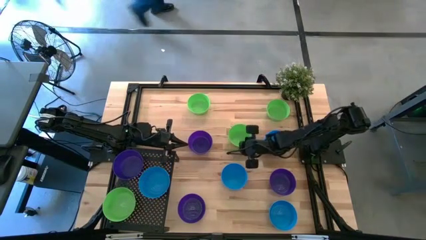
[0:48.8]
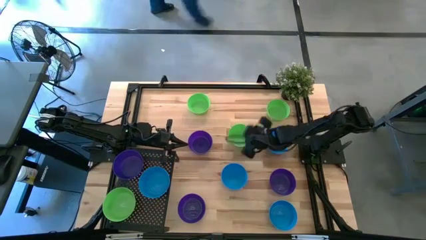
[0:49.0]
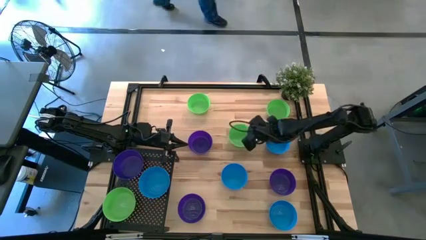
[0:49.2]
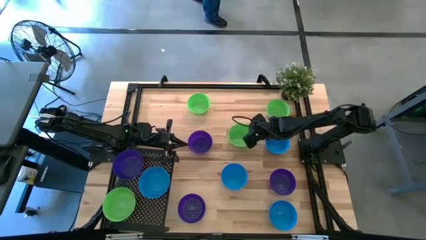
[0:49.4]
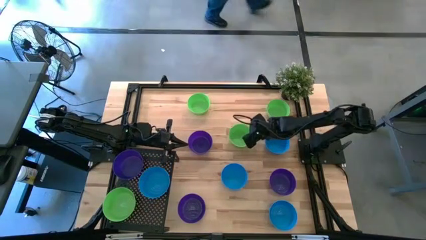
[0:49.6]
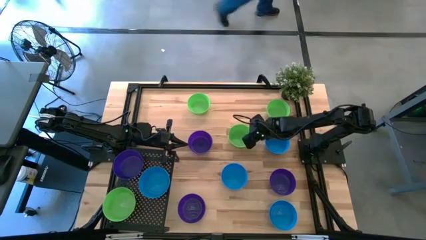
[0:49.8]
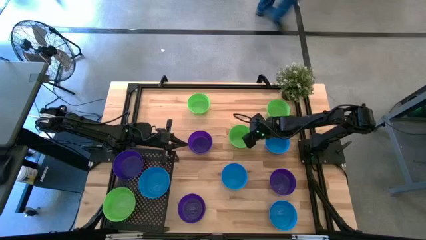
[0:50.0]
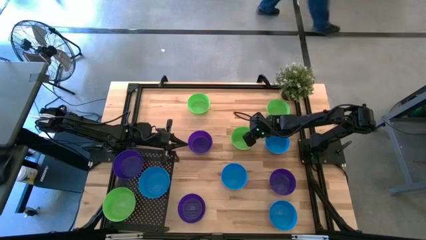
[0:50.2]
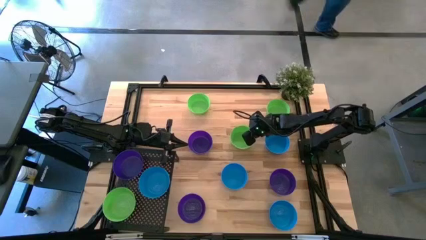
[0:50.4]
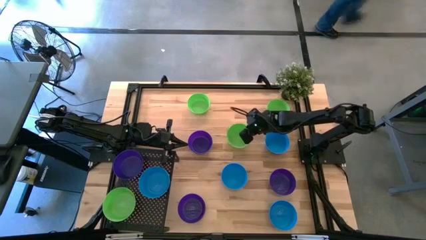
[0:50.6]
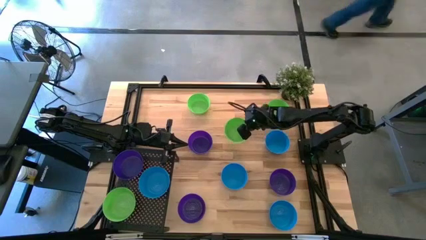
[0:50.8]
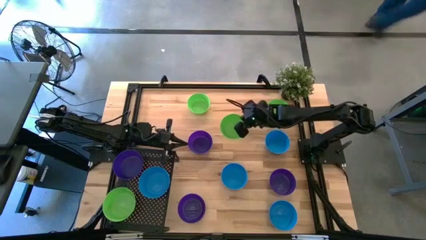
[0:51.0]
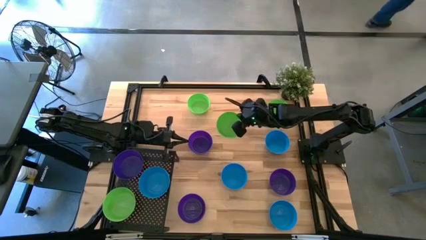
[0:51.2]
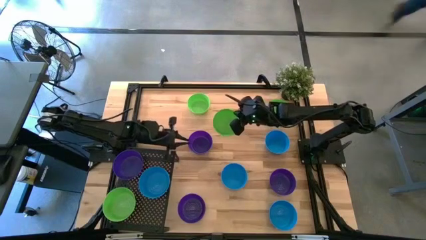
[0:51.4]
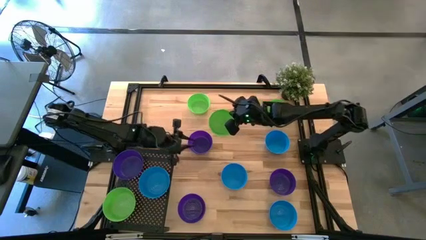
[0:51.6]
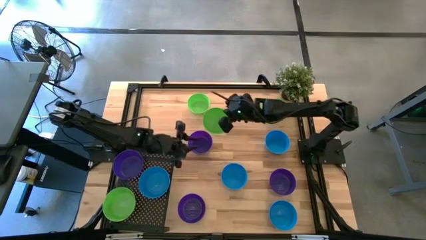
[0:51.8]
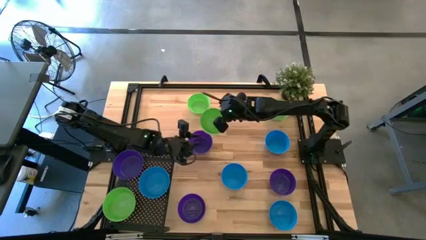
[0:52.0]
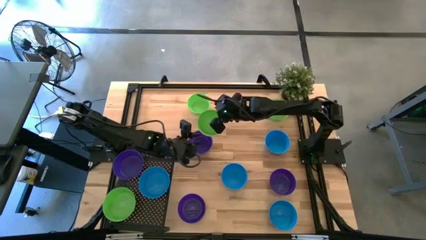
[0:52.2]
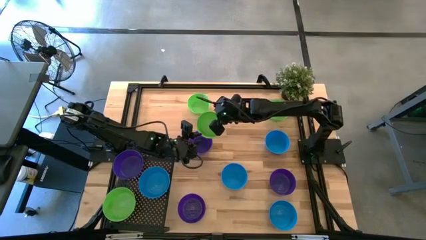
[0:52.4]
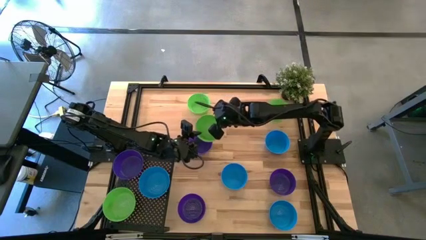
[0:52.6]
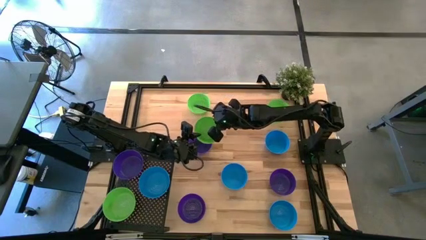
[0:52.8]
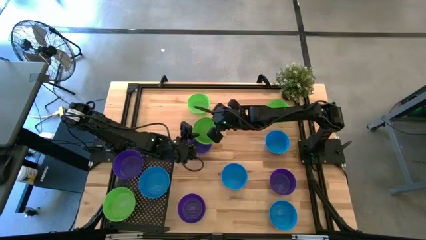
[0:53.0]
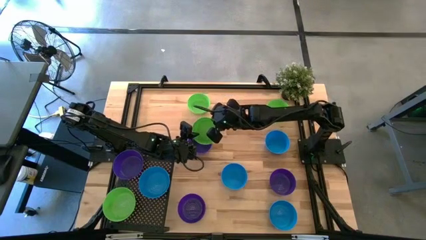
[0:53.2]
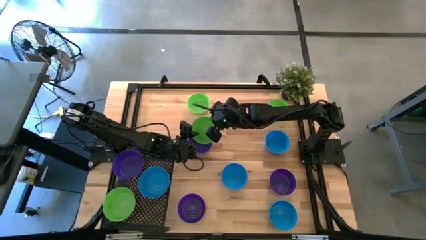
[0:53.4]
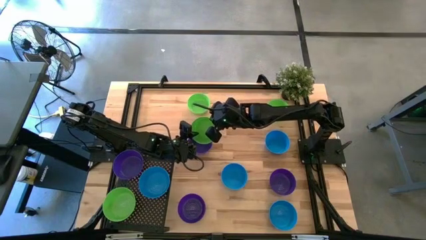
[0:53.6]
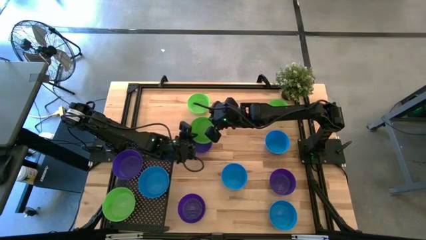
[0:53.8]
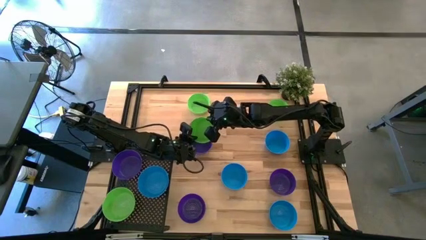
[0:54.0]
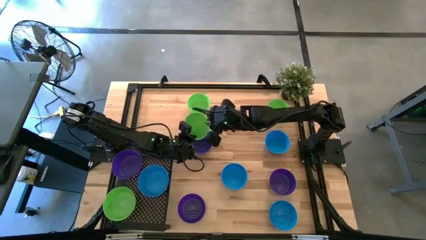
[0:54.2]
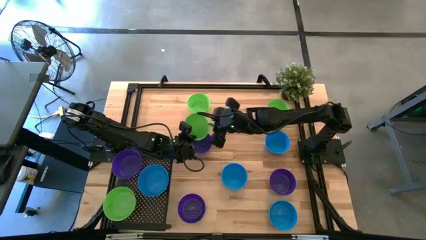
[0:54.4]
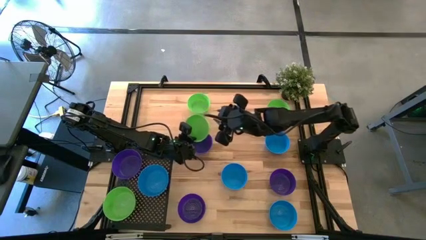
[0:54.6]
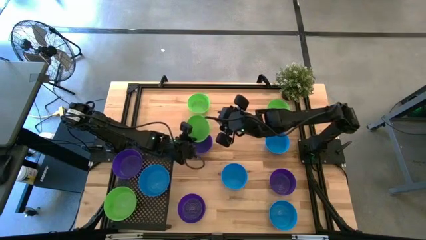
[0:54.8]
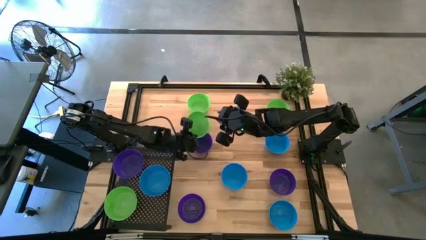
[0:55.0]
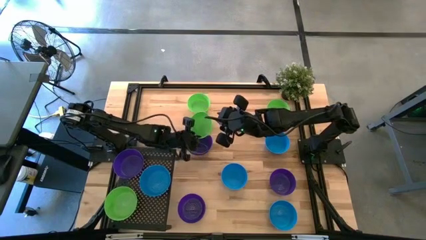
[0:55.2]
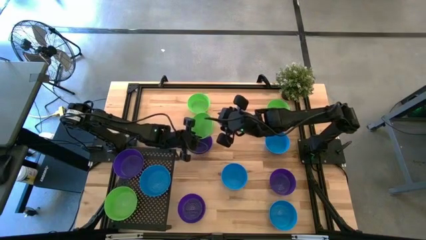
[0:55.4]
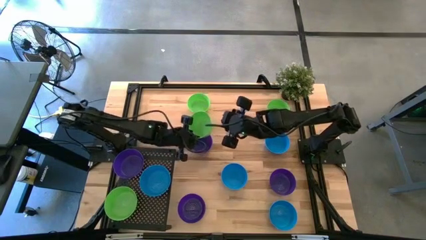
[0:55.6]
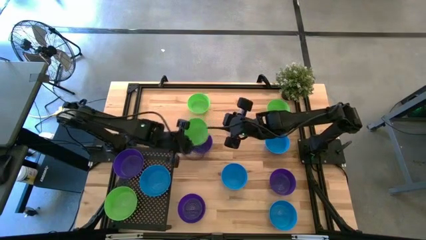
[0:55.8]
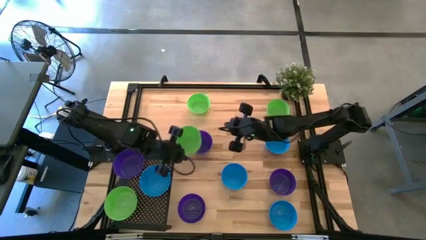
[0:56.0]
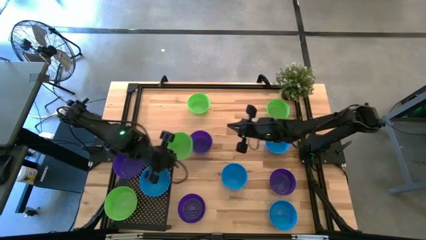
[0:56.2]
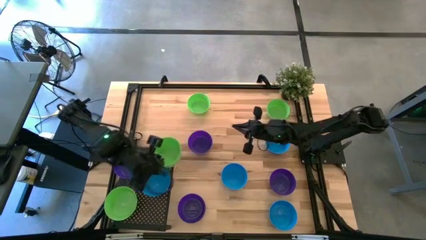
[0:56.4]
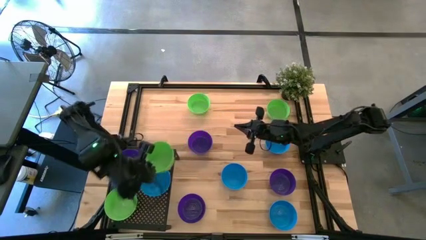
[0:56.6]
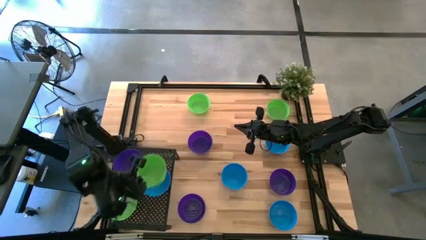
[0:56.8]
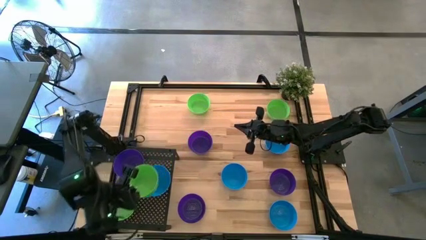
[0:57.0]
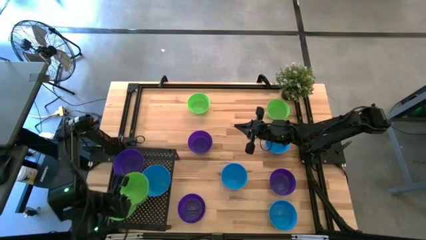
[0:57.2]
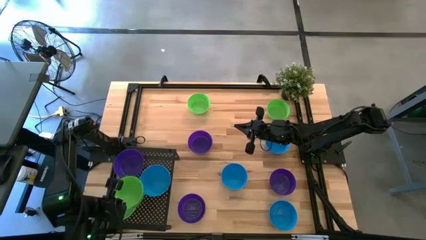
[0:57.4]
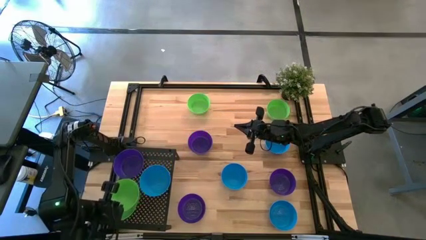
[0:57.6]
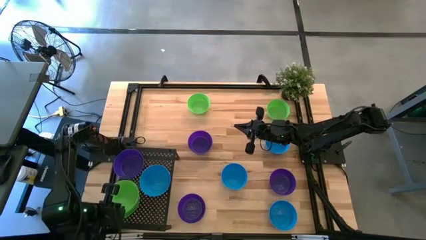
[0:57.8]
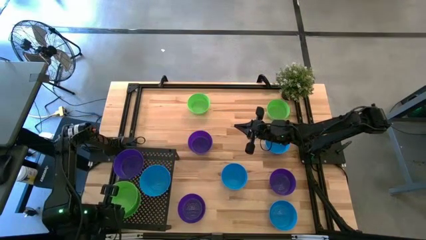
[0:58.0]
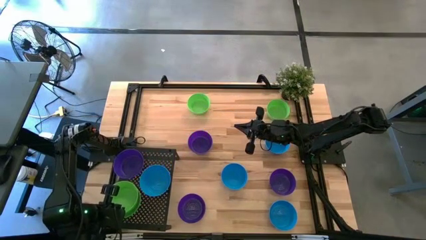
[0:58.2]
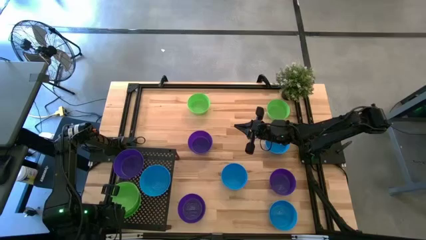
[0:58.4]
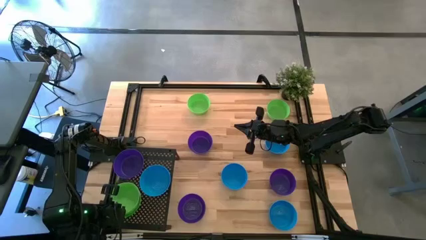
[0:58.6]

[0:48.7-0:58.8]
Task: Pick & Place Mini bowls
Stack the green bowl on the other green bowl on the shelf

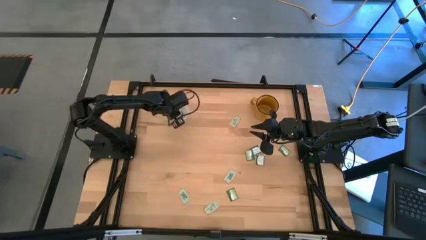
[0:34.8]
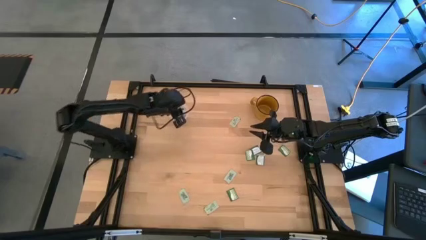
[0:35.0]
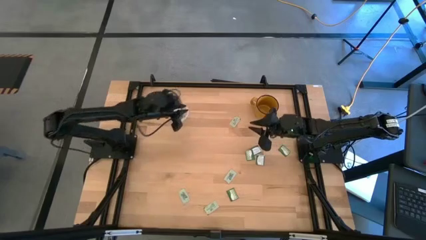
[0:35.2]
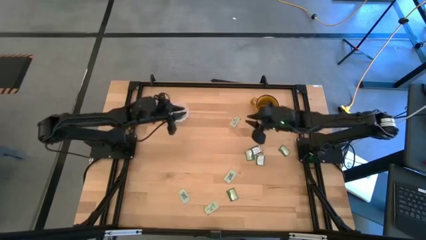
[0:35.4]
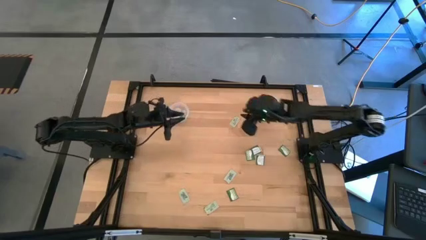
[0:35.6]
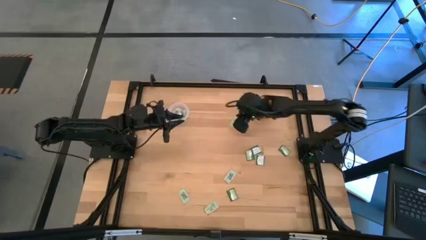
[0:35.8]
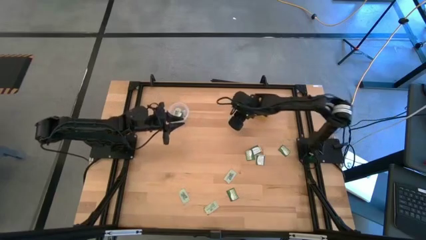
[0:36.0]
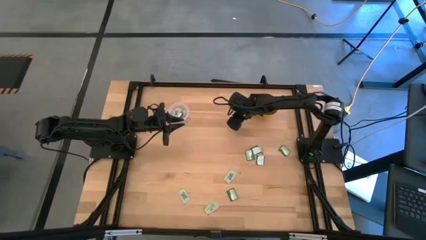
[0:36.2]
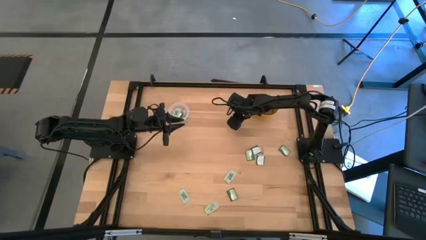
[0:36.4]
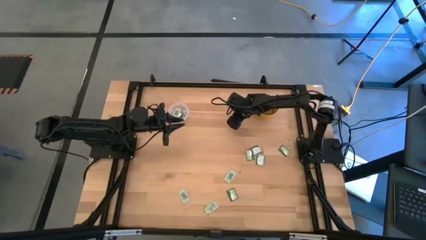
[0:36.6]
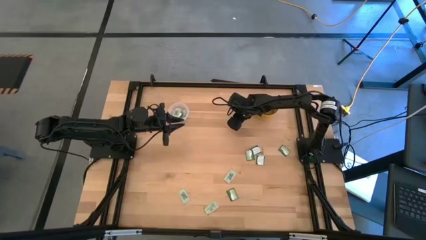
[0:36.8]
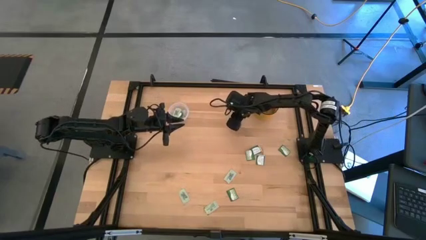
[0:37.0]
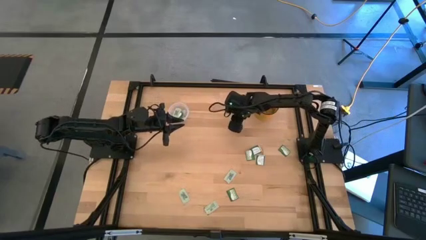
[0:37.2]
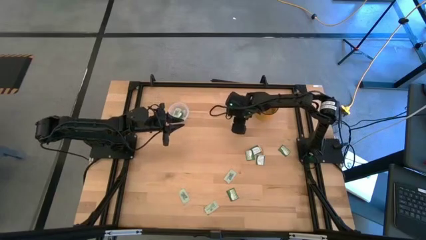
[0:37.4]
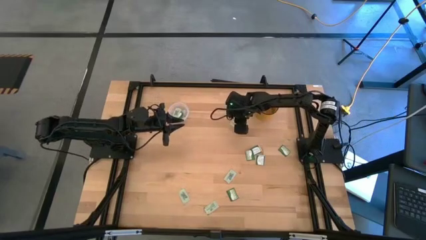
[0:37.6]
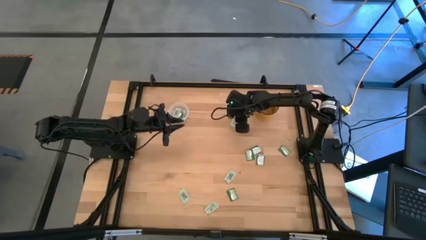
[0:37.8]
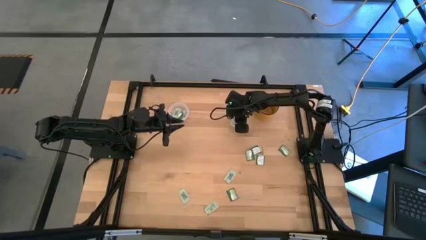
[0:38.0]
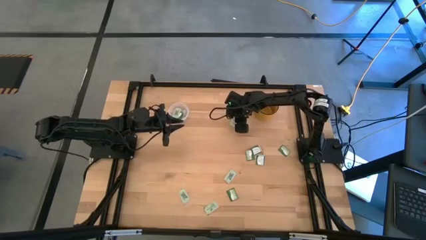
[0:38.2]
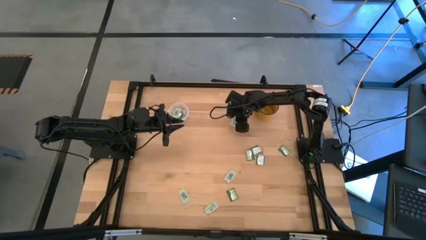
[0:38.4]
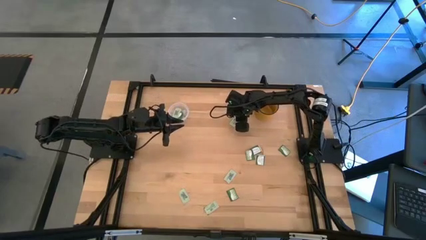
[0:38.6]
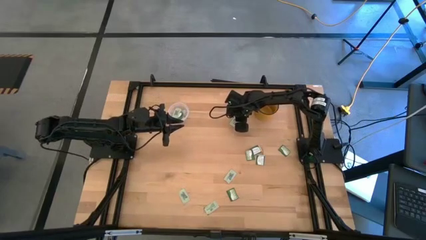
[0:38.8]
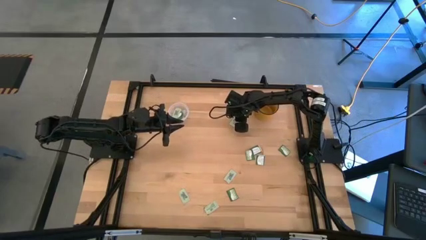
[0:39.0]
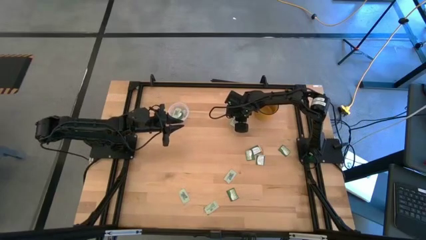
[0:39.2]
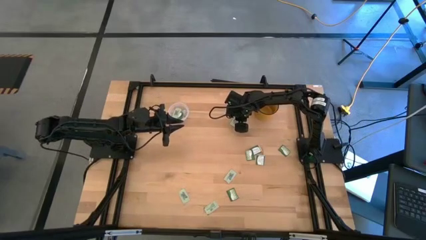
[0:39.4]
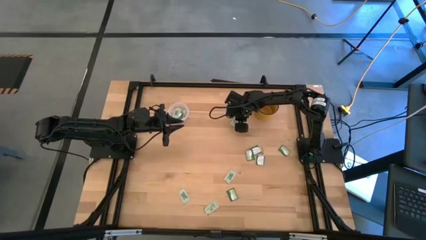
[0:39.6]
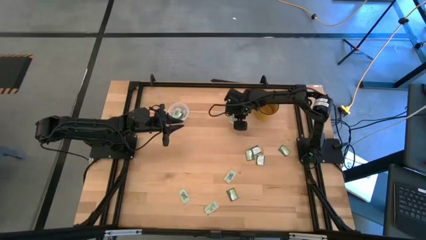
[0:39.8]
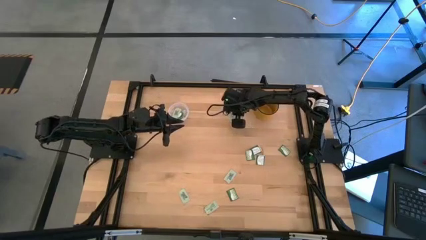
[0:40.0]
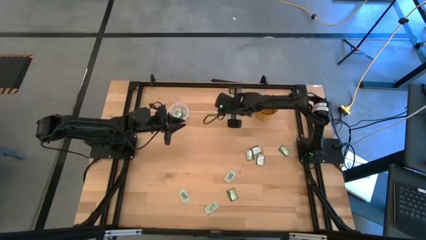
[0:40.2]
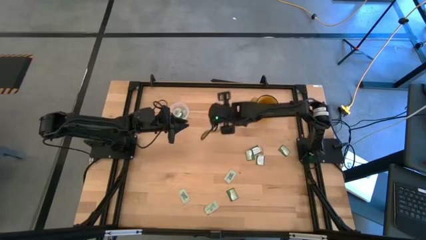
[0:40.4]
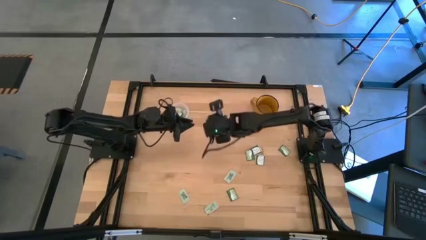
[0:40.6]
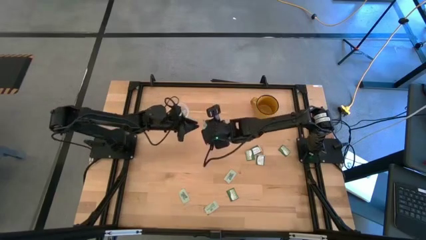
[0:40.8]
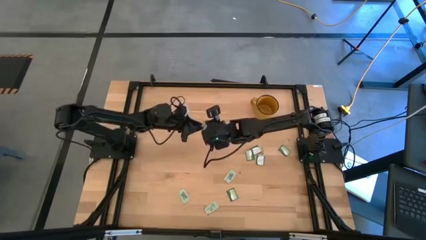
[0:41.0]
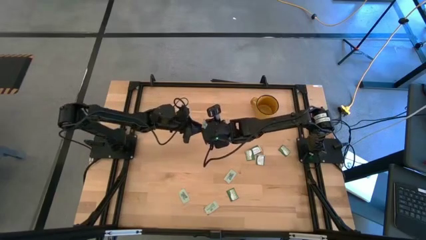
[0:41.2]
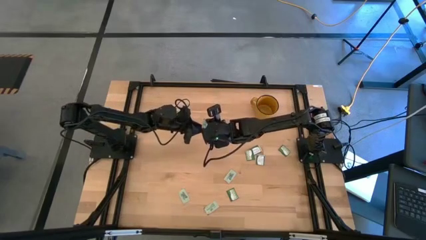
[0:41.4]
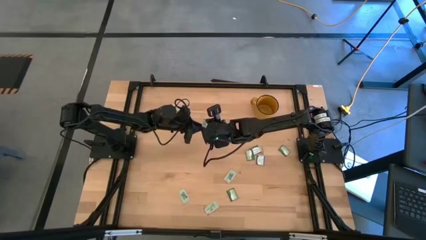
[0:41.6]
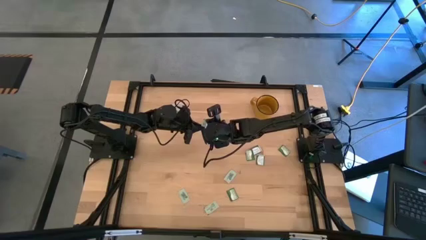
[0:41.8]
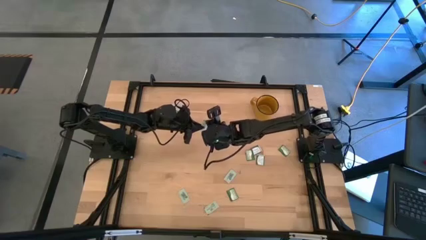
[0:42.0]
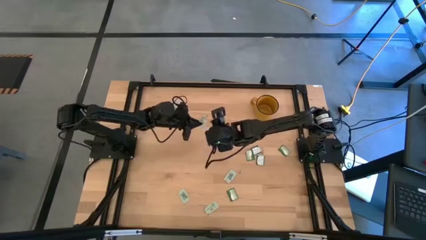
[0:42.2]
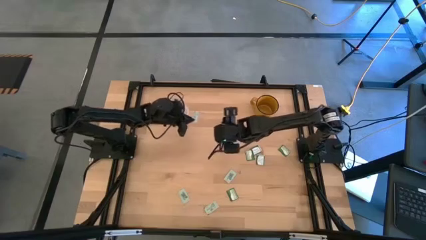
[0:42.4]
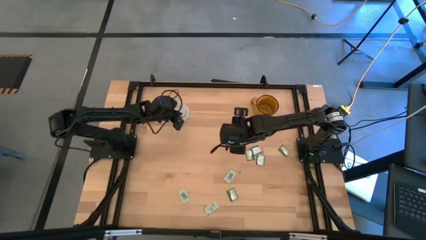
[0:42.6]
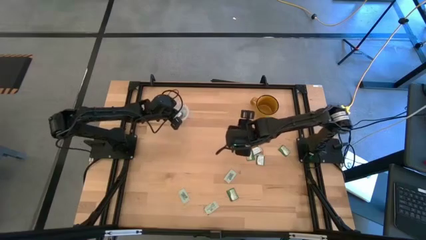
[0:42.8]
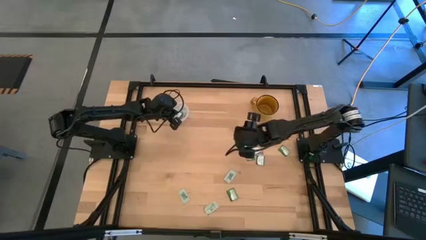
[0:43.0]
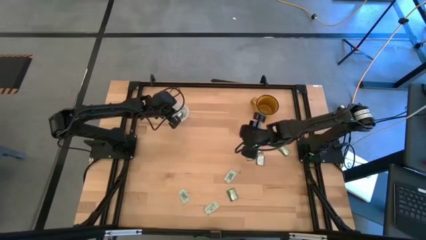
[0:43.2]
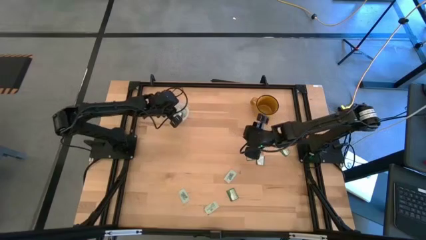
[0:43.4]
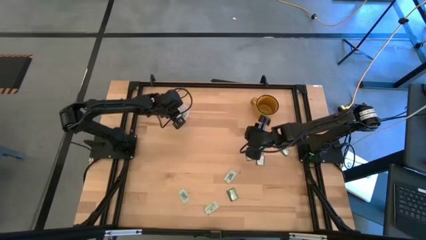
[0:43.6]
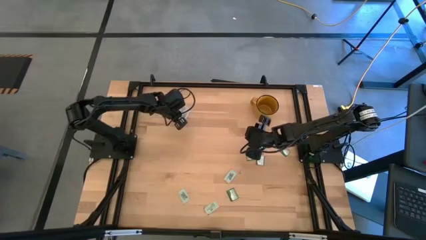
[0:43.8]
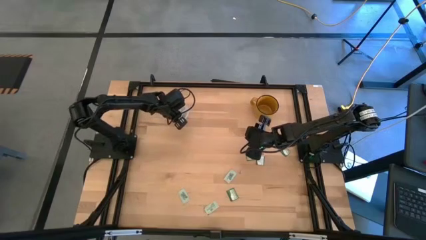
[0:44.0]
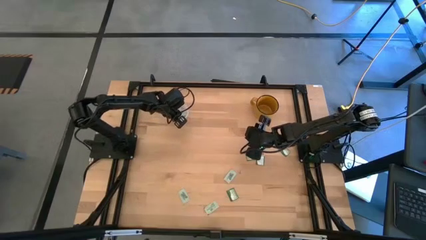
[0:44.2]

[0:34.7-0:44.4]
Task: Pick and place Stevia / Truvia into bins
Put the stevia packet into the transparent container
